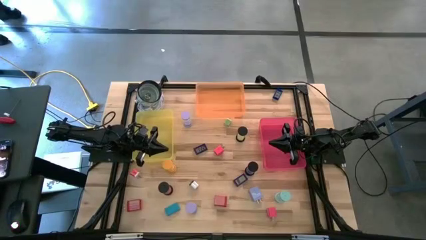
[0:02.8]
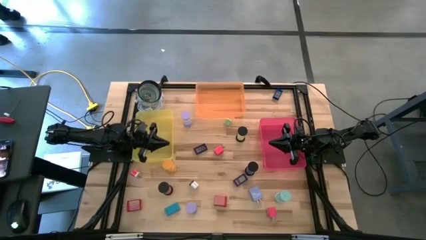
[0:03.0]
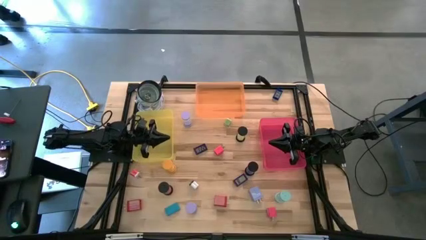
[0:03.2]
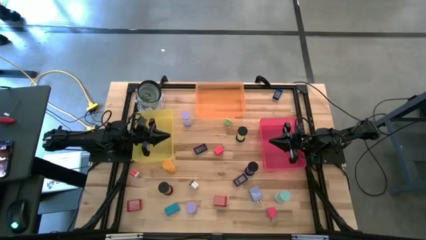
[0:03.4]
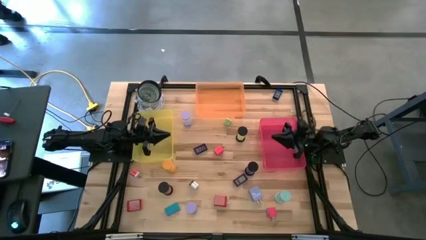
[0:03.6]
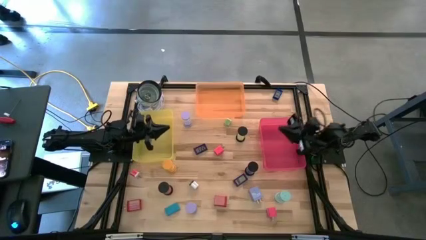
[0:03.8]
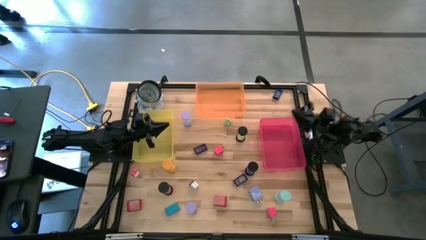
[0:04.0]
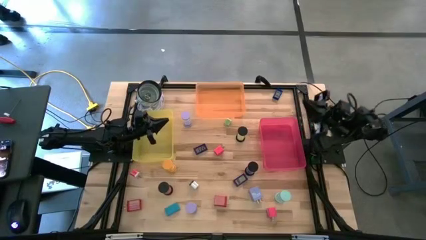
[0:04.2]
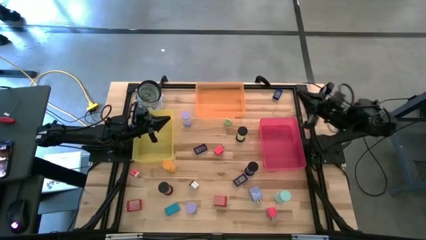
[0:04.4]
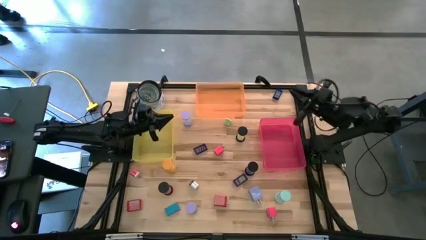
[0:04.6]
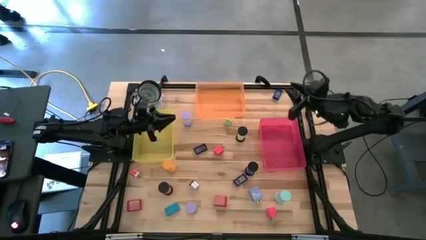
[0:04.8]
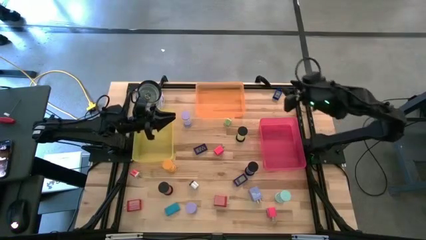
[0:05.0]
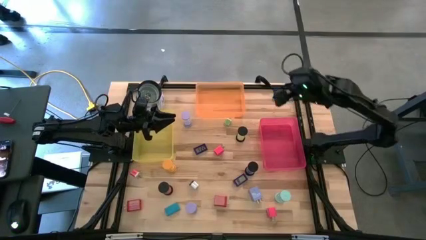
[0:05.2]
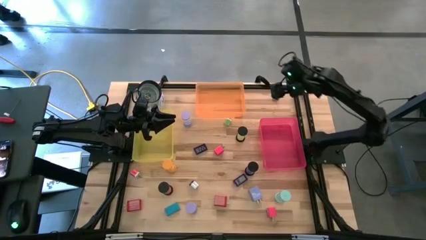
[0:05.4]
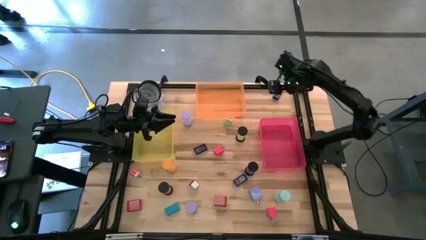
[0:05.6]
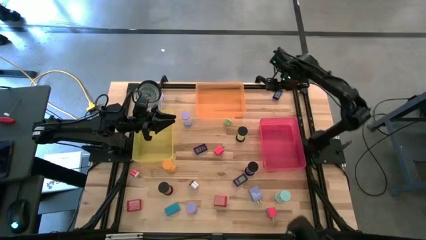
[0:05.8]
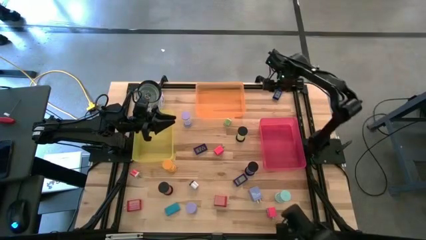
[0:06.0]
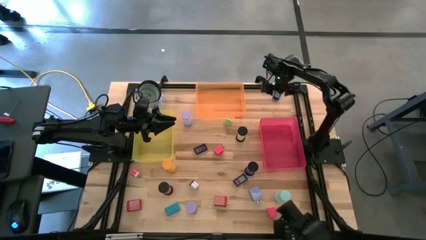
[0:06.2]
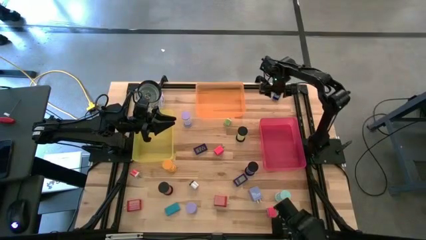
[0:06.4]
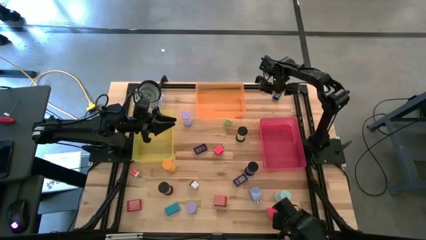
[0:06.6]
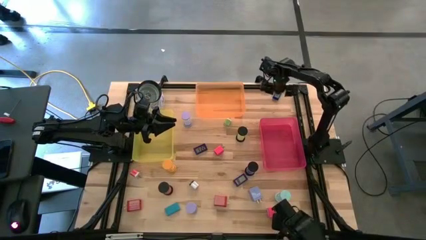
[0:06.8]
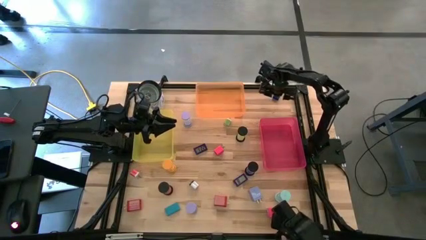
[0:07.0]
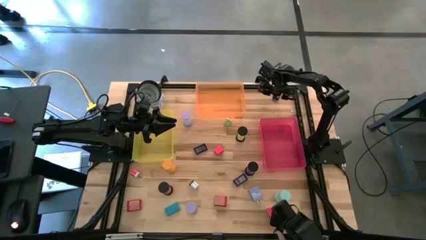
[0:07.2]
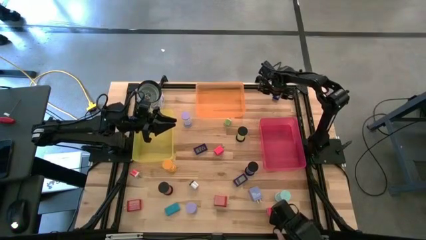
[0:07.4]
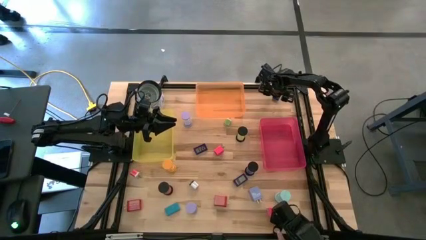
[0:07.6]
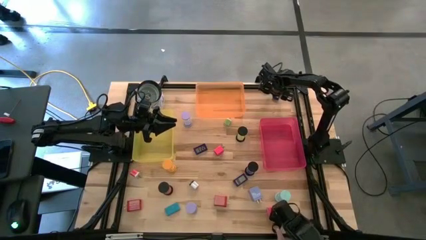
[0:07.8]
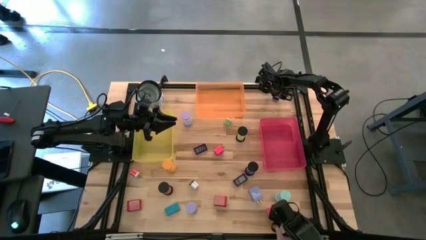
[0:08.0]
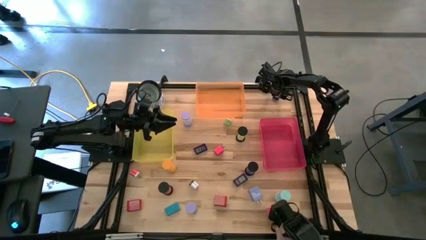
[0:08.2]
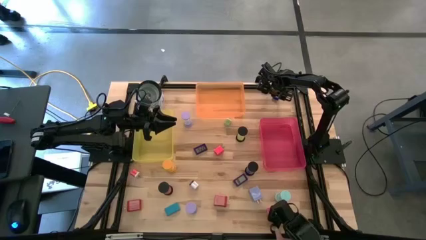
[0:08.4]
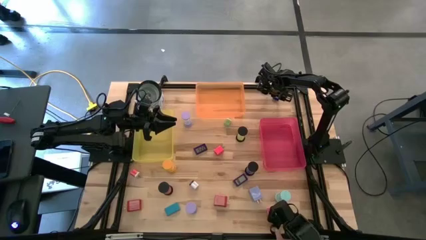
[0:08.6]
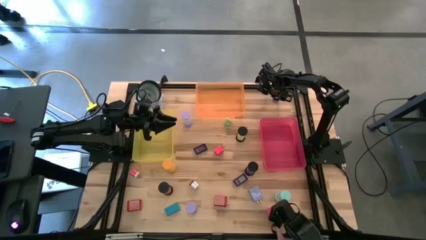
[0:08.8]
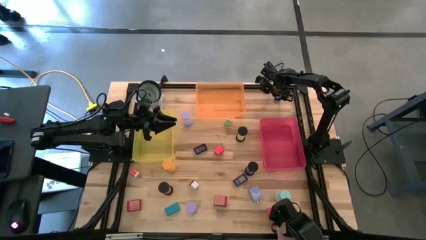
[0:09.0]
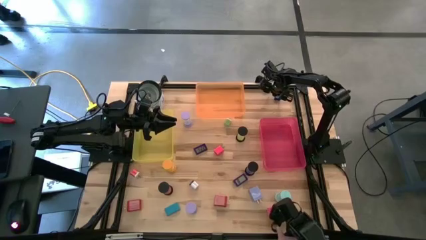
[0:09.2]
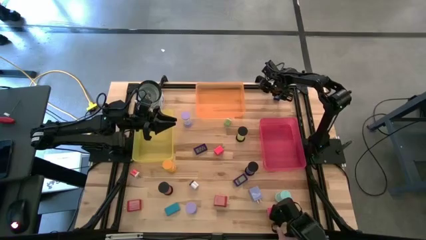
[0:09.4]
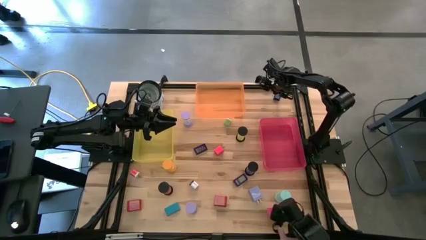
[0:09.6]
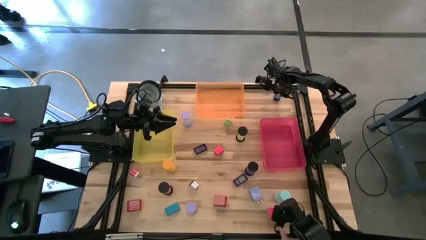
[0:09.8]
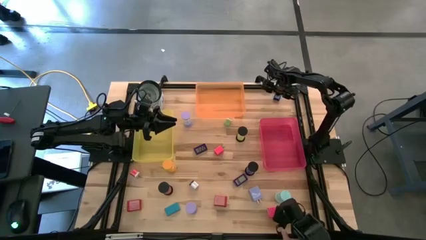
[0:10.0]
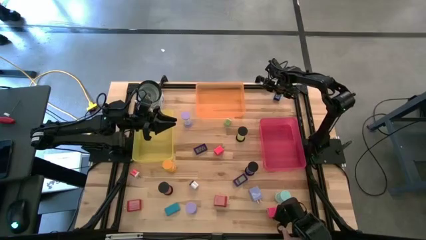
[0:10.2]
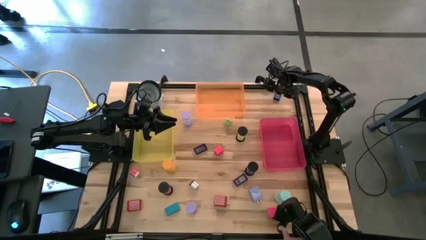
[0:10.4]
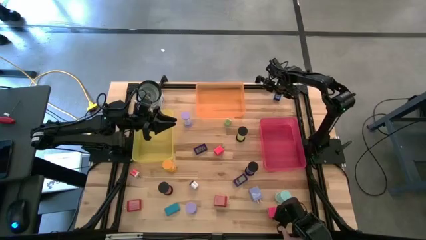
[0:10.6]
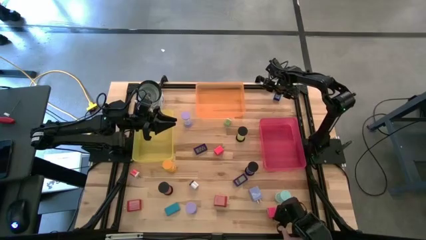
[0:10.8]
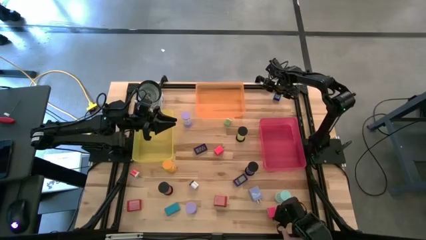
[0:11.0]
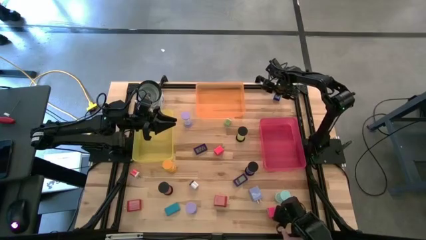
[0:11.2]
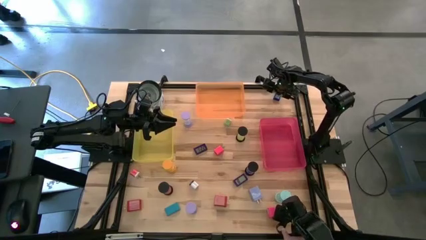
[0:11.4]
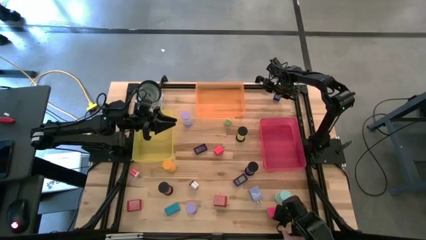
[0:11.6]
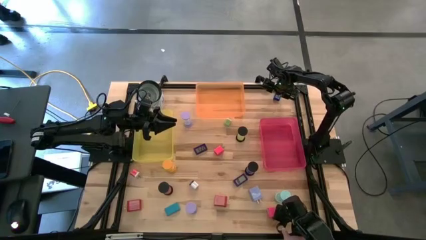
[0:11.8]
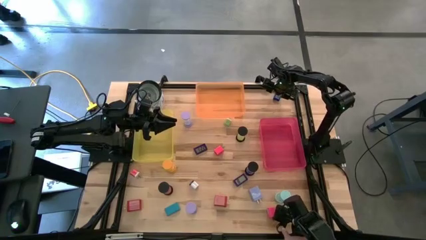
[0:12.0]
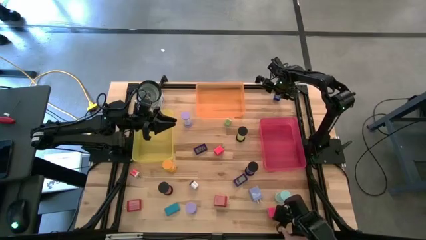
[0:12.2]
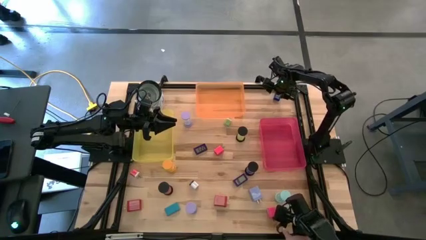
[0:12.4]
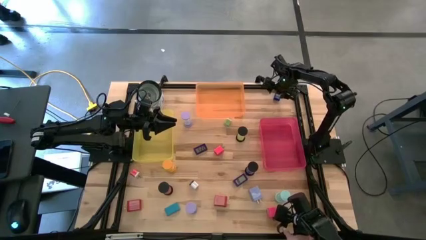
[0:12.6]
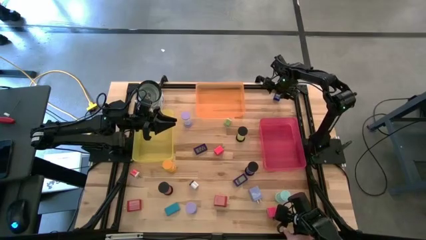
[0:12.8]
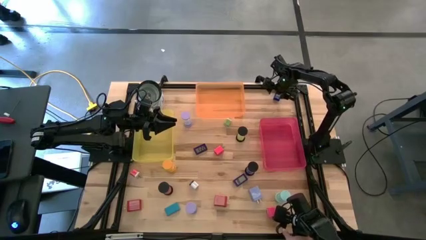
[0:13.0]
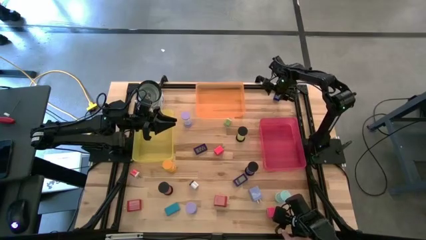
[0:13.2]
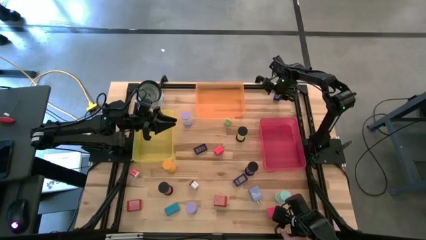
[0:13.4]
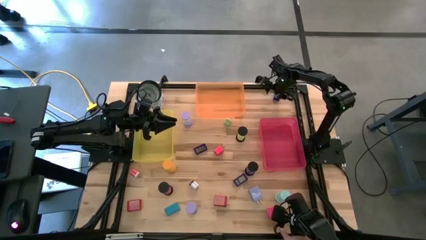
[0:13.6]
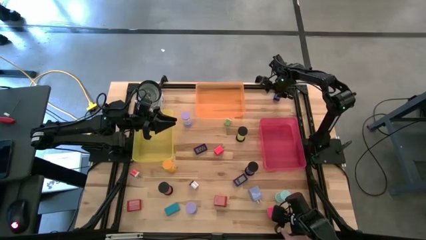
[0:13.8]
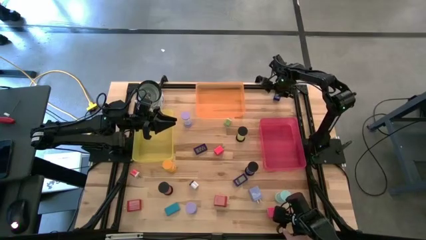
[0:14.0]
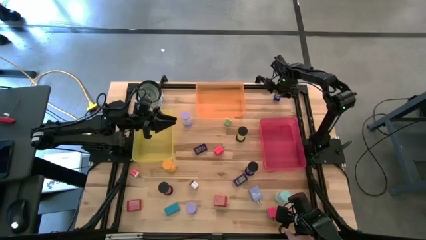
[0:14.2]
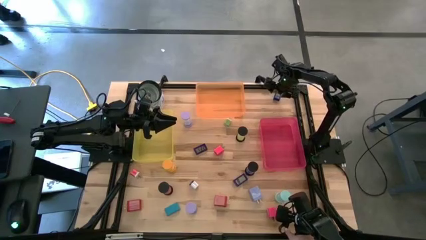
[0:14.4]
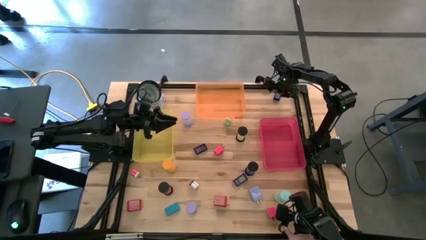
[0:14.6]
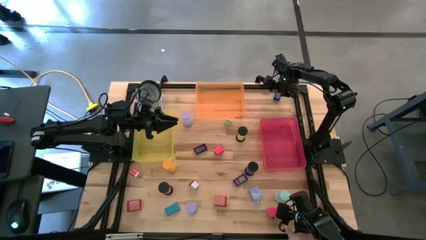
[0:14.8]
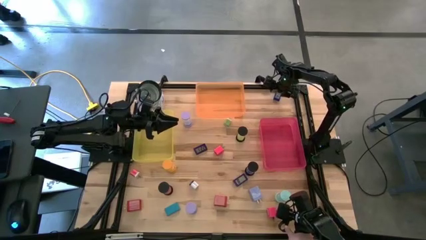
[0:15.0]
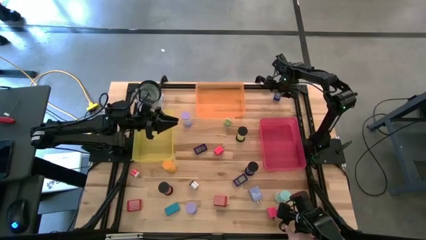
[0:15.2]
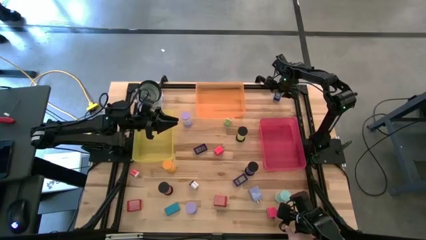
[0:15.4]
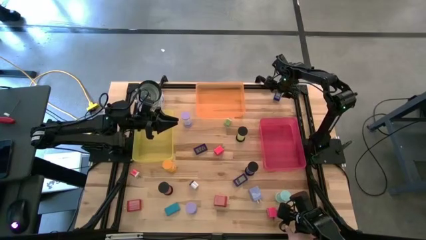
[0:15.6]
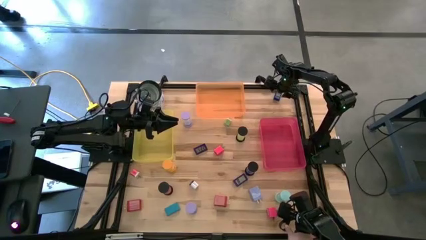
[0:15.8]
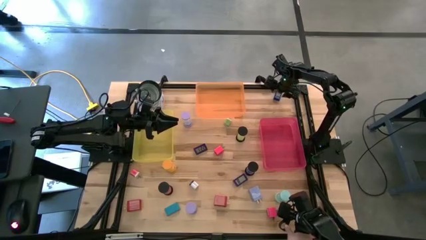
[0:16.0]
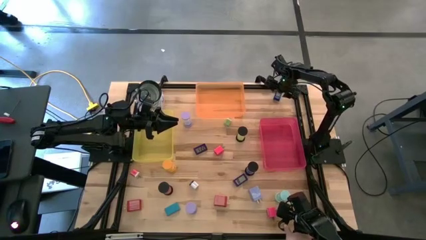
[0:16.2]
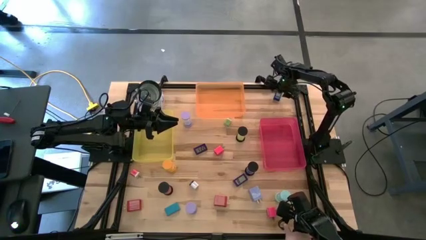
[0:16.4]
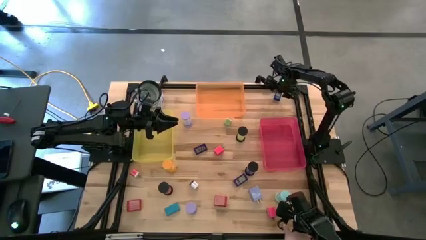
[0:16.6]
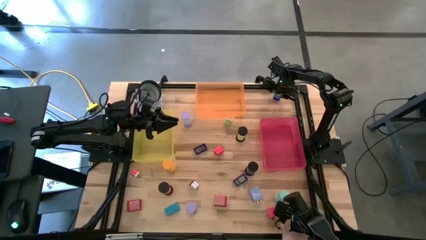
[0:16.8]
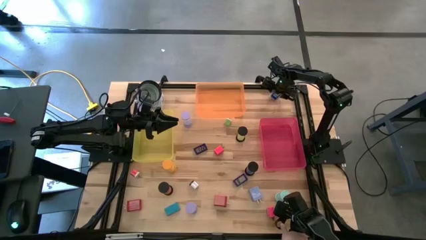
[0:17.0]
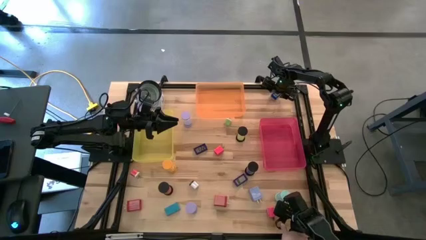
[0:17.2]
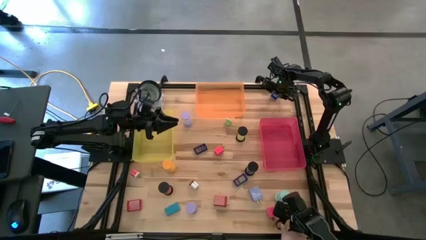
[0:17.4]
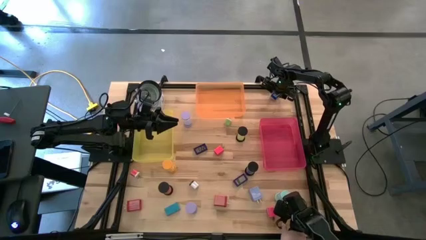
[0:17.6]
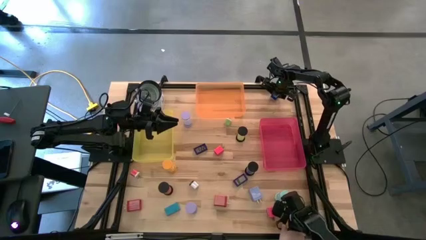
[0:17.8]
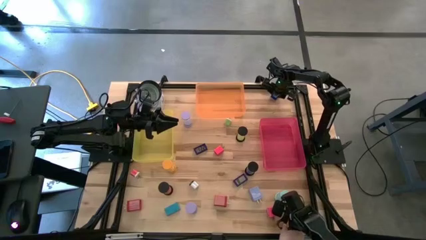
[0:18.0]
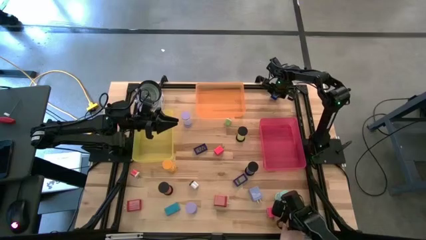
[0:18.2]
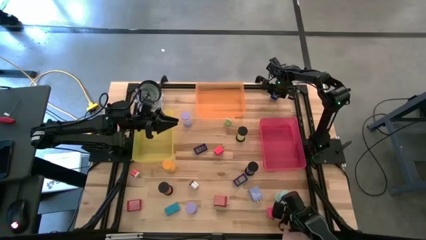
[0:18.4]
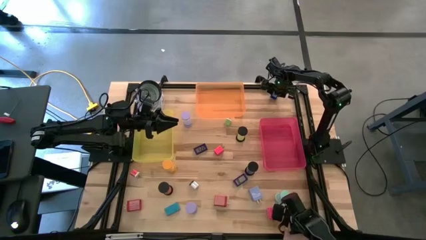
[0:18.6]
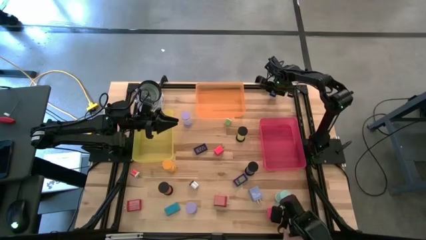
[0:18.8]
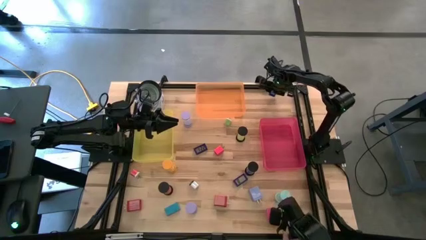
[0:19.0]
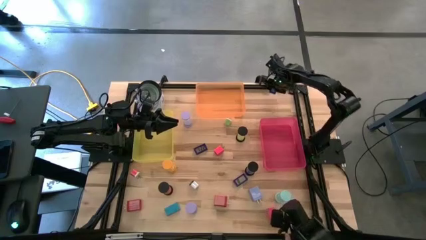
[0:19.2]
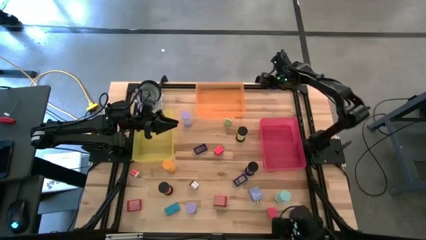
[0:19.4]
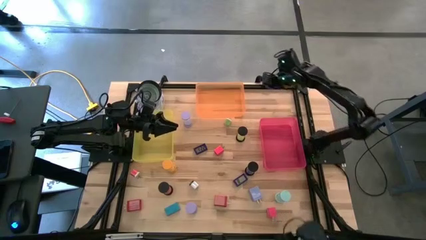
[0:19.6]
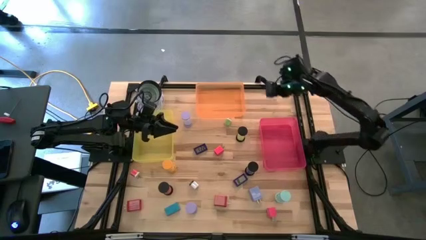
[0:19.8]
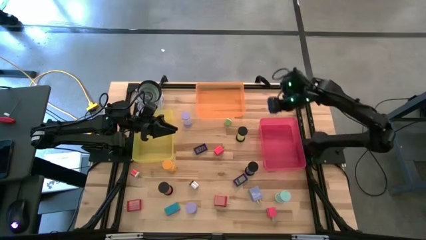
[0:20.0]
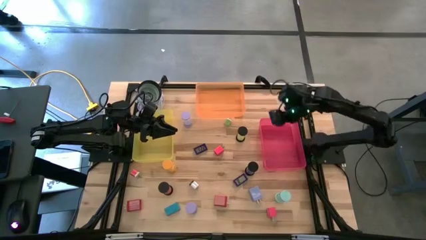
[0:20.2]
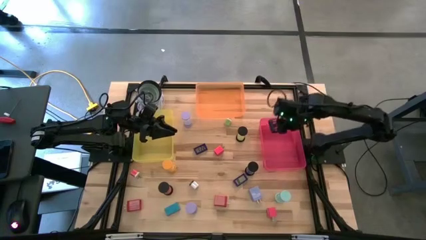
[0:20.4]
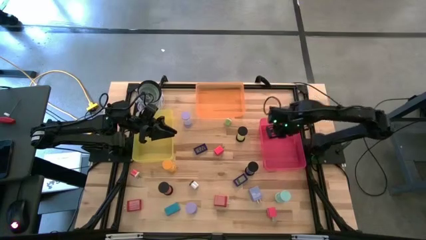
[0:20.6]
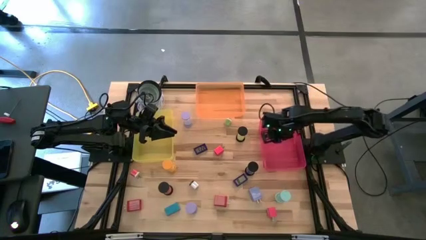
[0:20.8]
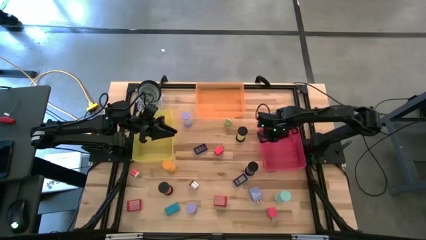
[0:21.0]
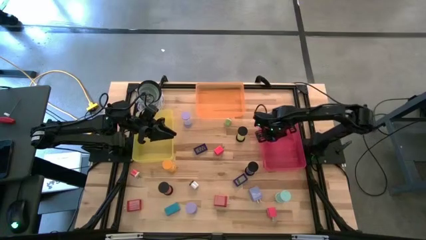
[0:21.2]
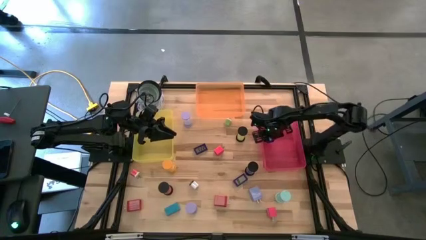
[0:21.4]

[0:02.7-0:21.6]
Task: Pick & Place Office items
Put the blue block in the red bin
